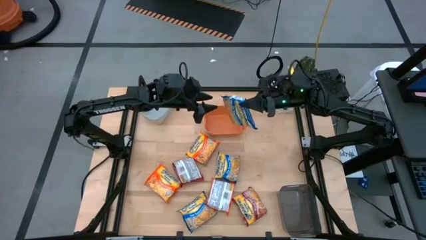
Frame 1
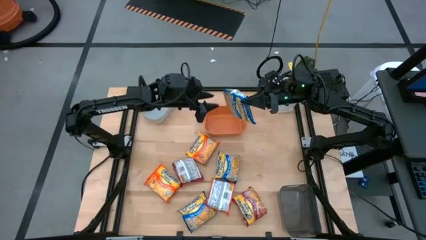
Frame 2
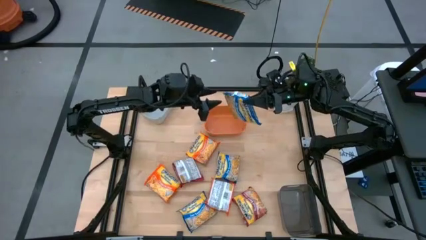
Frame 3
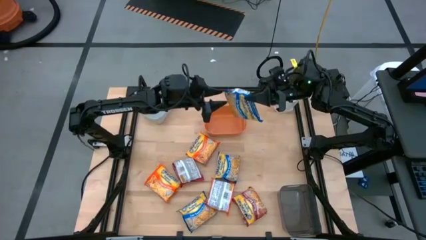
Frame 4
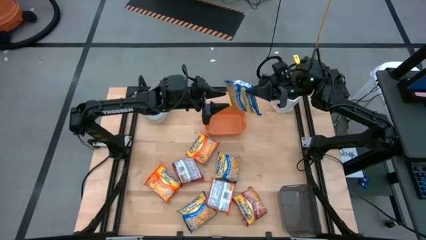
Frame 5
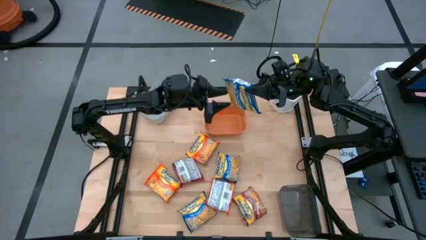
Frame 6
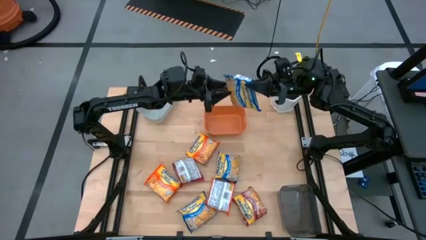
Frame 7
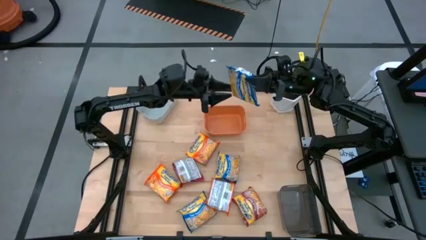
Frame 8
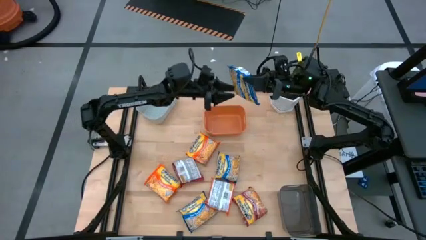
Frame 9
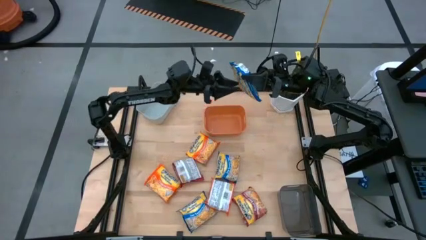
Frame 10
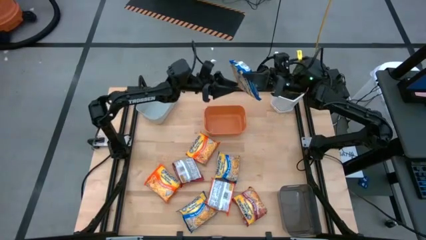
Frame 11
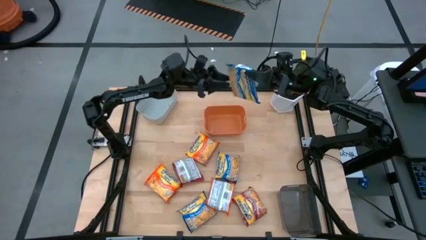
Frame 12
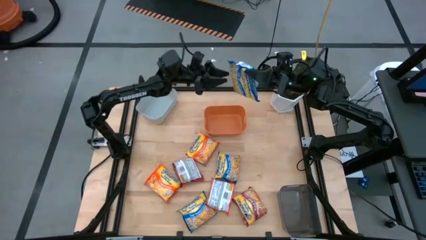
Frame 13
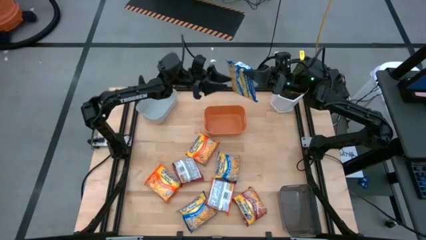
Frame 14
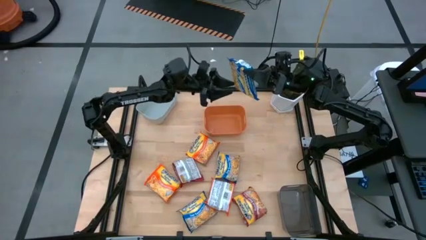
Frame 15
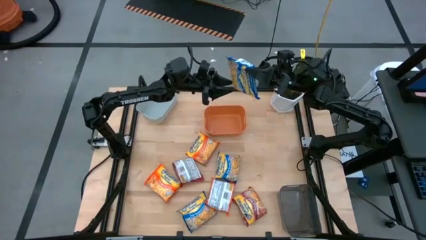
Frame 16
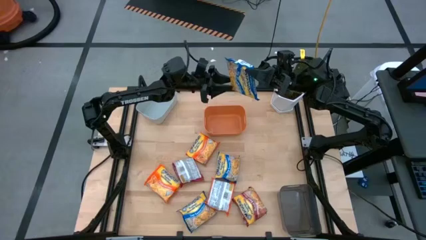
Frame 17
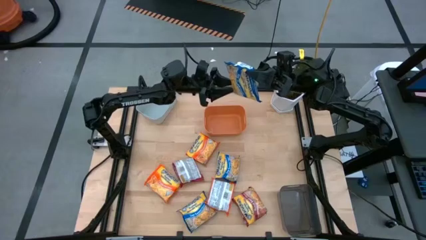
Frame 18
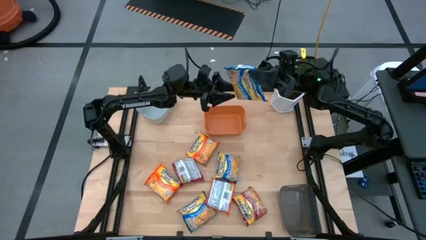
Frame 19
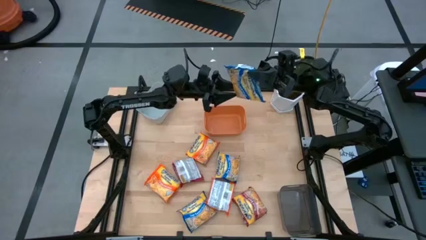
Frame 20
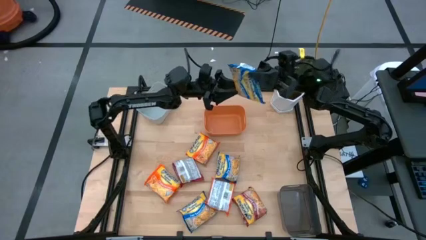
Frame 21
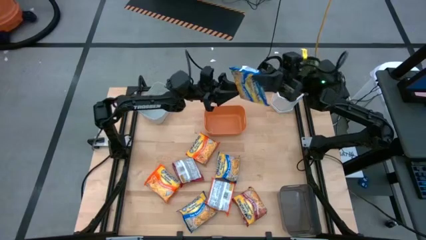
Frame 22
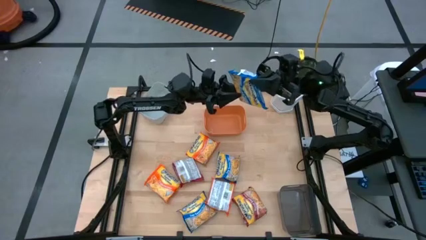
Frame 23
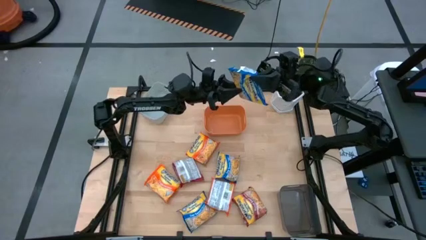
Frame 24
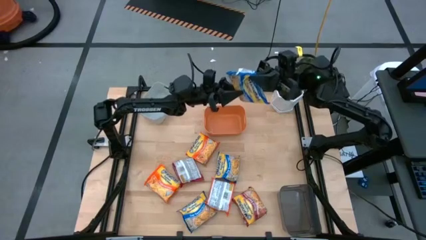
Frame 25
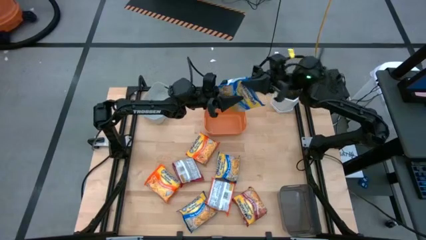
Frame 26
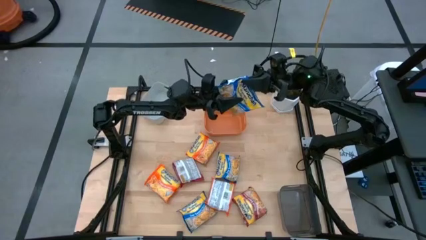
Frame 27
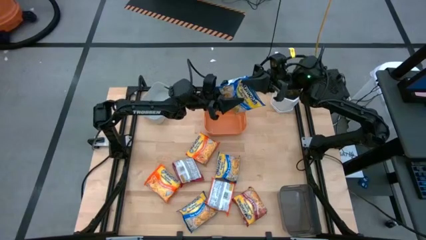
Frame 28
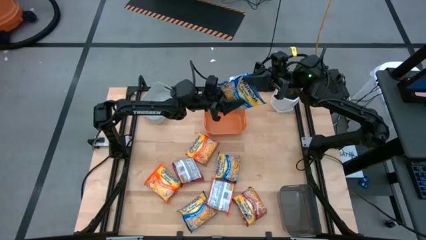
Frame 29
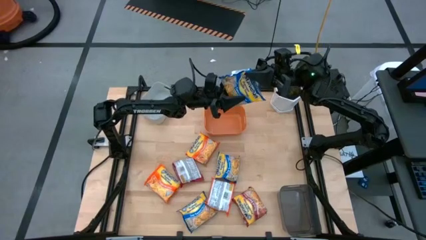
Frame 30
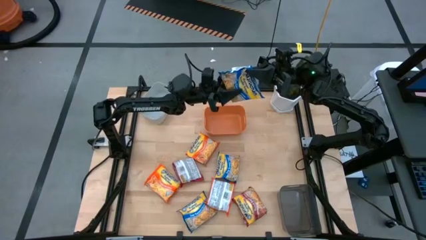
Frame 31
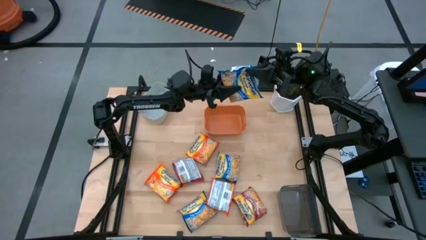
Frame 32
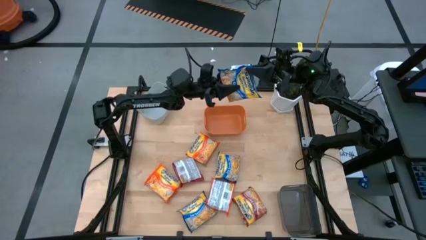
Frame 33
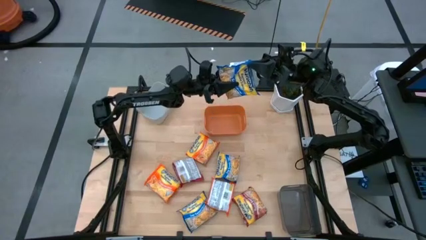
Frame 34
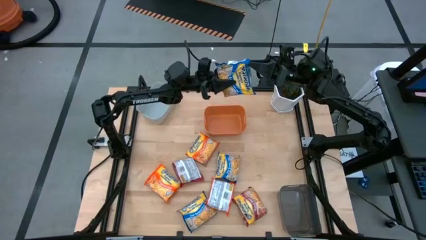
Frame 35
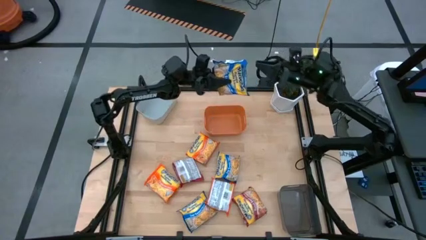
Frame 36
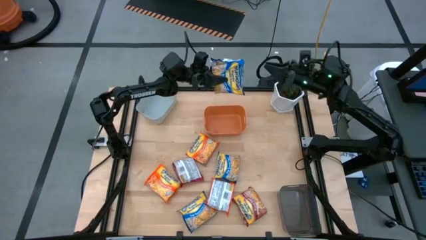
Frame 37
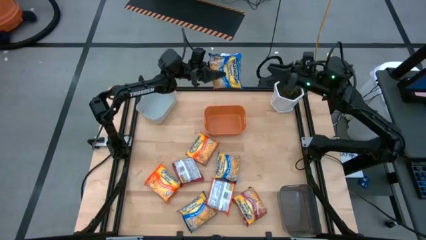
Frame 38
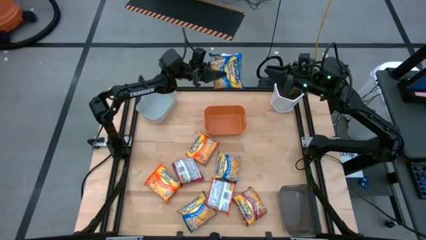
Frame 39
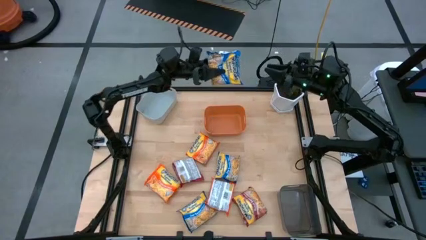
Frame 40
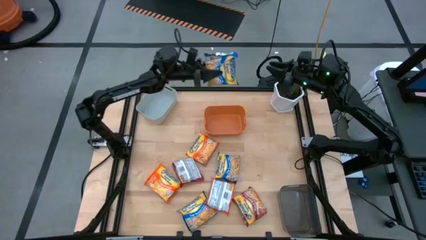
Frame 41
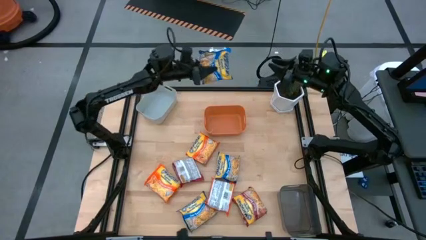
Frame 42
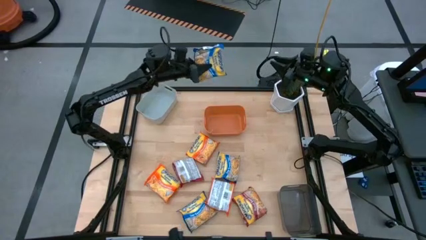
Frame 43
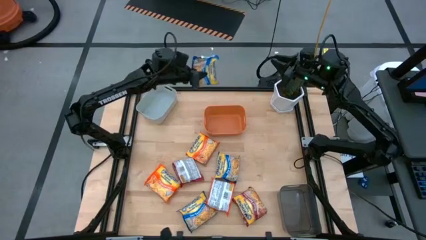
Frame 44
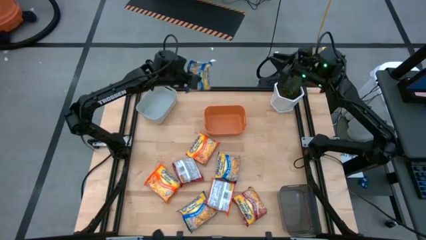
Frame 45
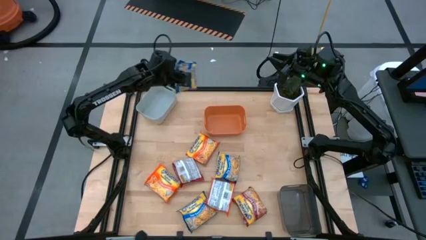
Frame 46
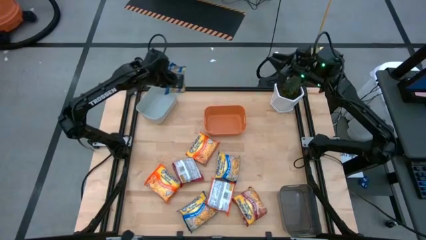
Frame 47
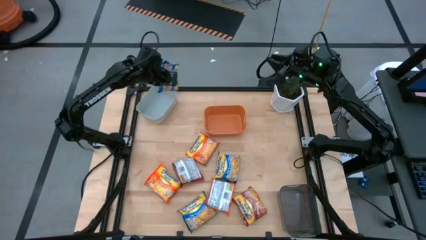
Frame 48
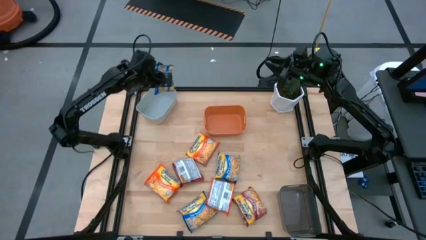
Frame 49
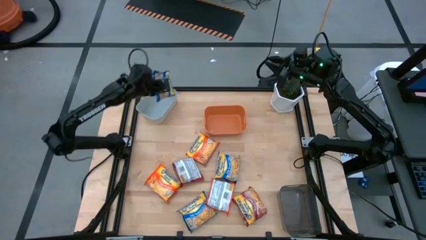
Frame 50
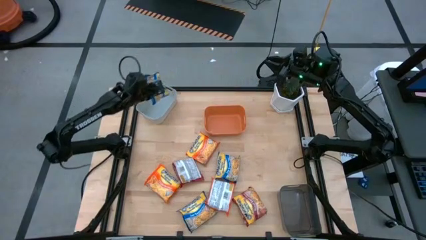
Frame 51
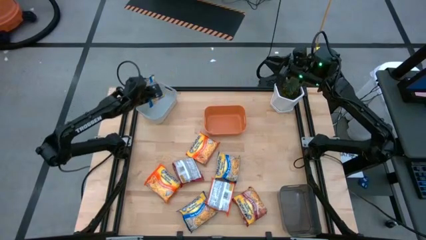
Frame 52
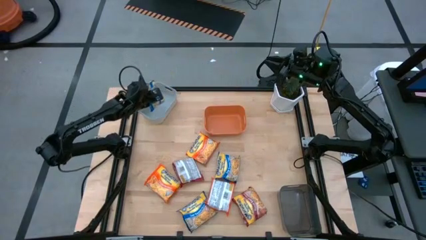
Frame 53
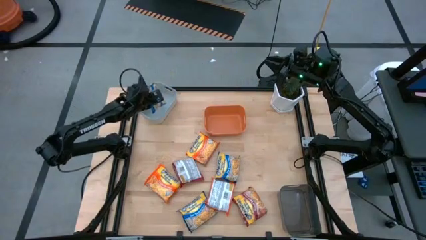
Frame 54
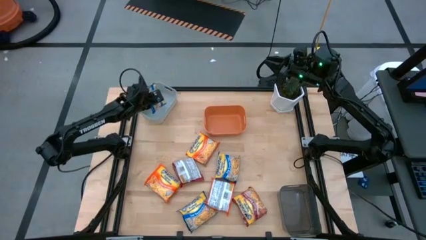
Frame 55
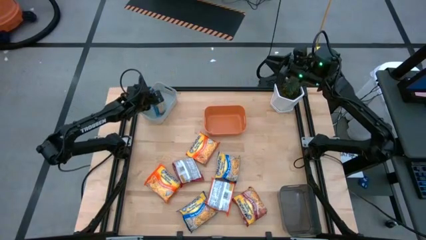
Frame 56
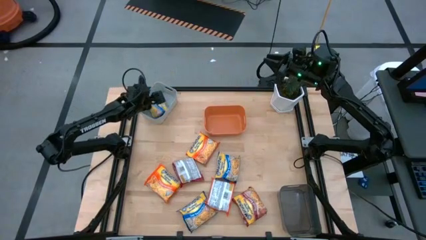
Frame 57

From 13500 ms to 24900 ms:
Task: Sort Maruchan noodles
Put the top blue noodle pack into the gray bin
